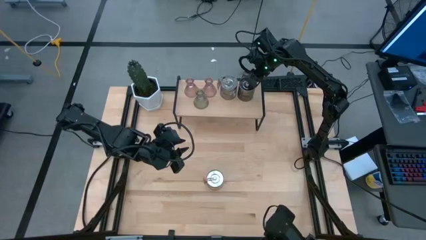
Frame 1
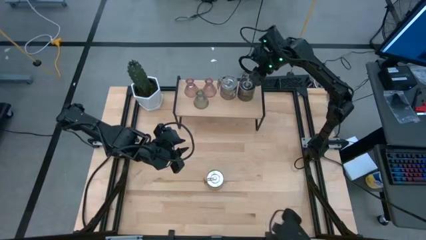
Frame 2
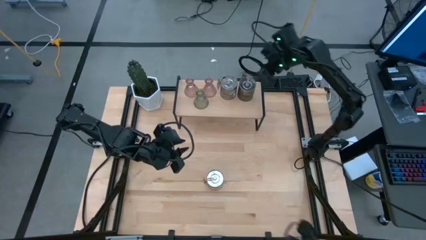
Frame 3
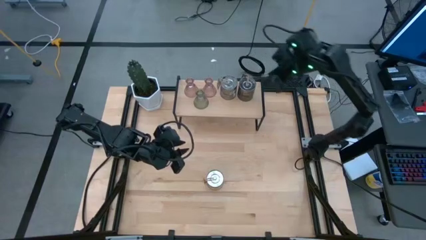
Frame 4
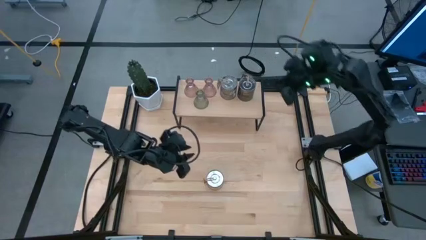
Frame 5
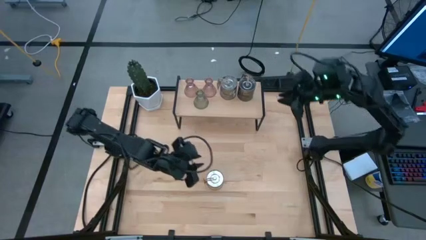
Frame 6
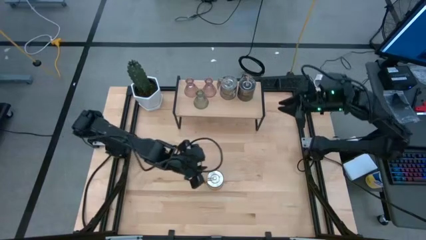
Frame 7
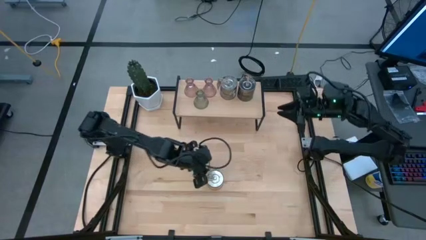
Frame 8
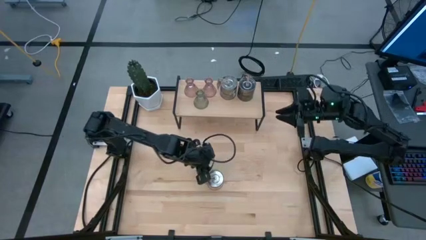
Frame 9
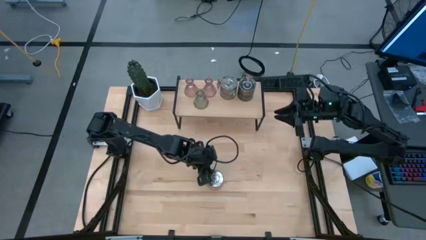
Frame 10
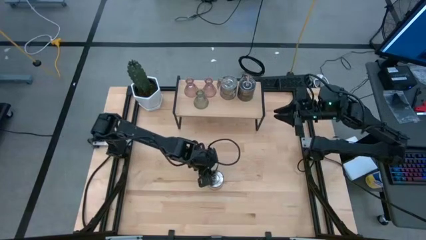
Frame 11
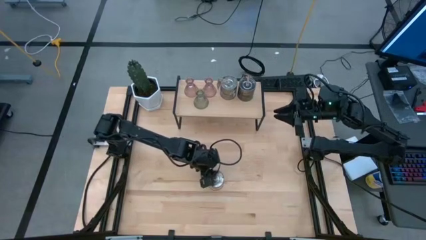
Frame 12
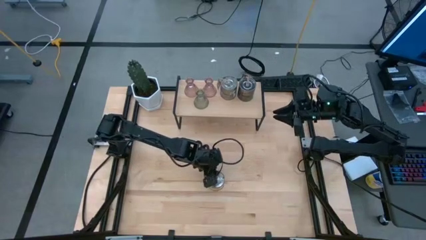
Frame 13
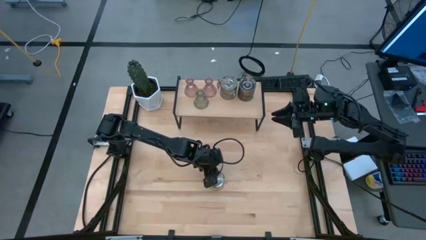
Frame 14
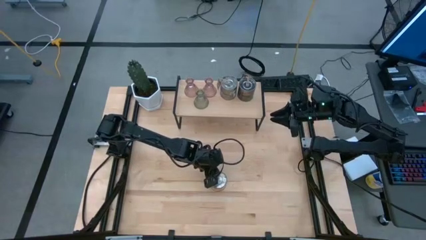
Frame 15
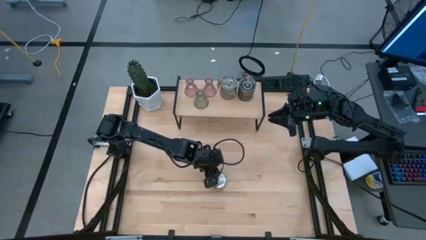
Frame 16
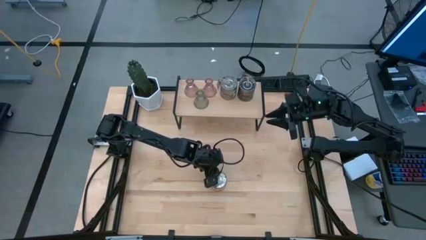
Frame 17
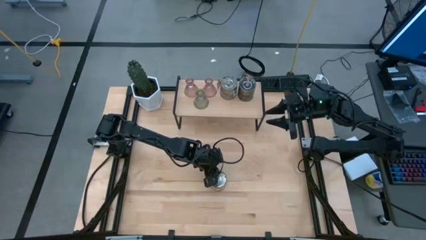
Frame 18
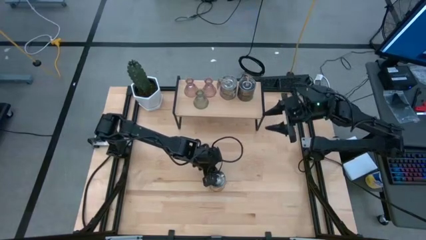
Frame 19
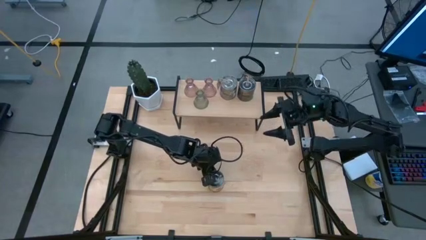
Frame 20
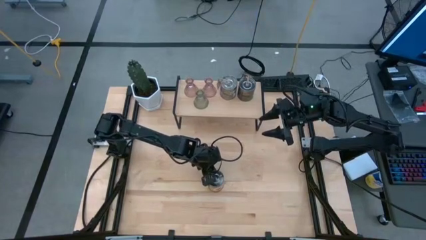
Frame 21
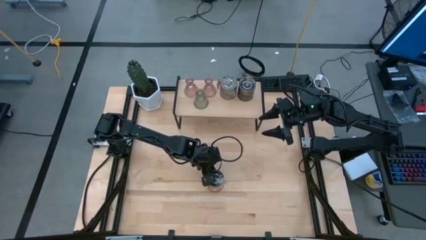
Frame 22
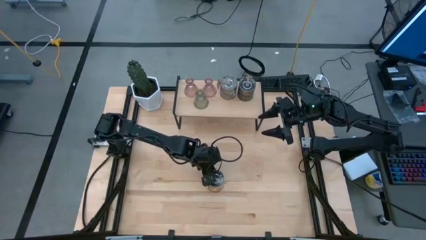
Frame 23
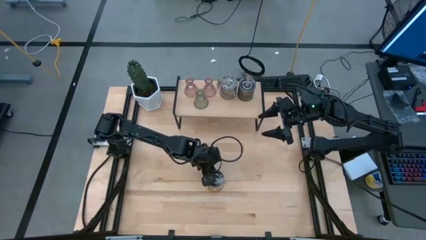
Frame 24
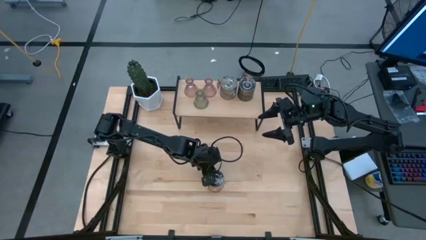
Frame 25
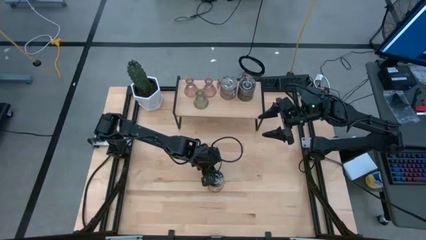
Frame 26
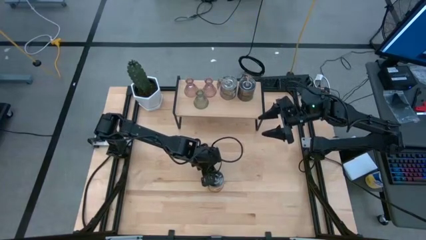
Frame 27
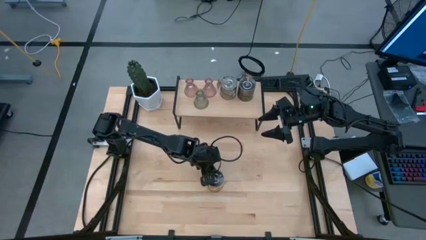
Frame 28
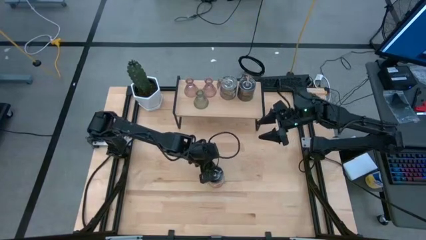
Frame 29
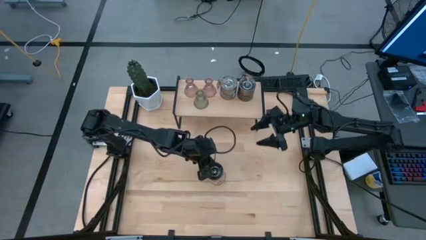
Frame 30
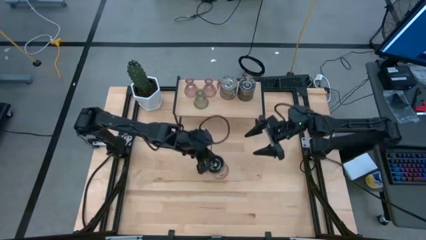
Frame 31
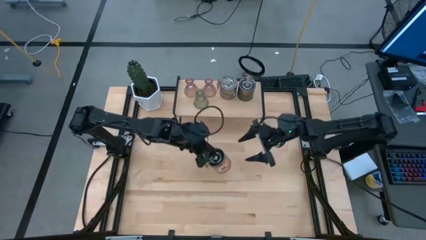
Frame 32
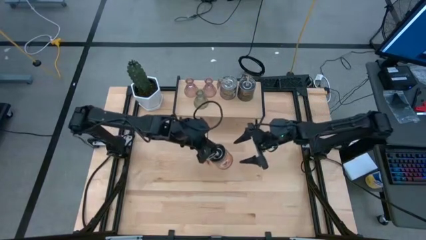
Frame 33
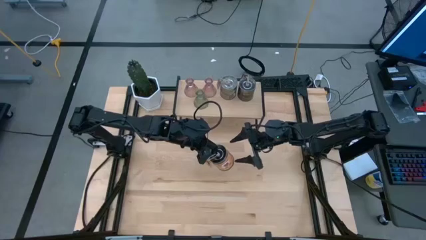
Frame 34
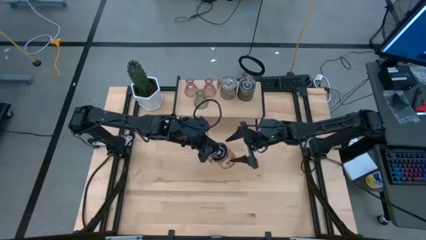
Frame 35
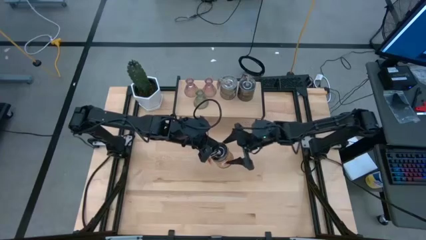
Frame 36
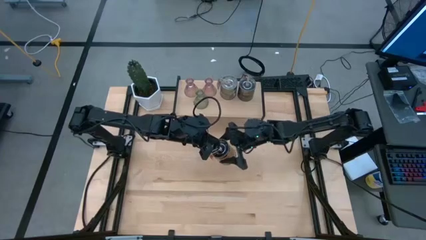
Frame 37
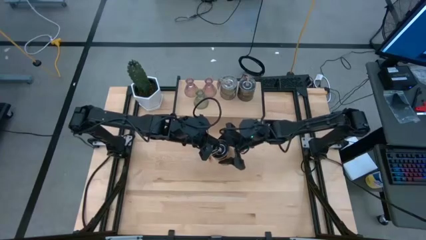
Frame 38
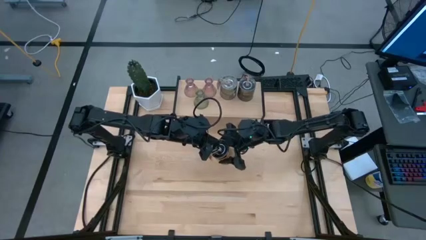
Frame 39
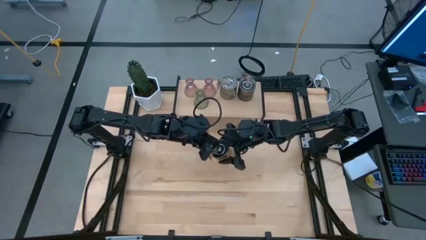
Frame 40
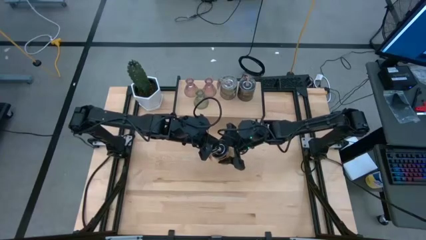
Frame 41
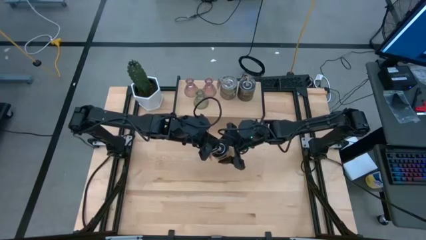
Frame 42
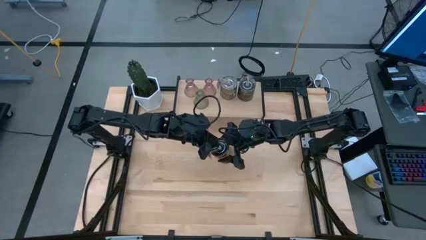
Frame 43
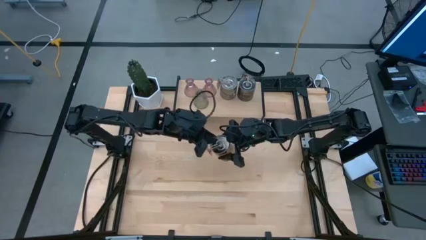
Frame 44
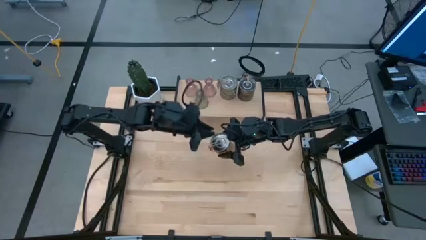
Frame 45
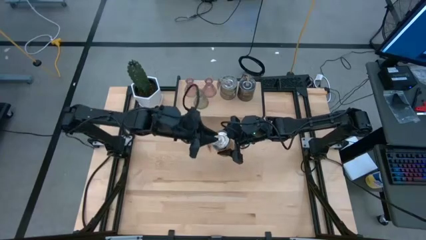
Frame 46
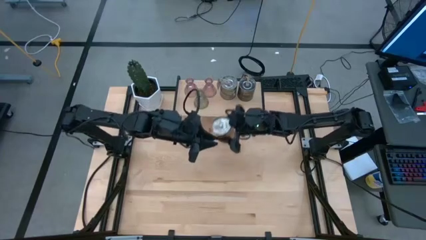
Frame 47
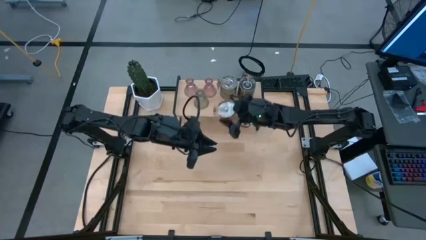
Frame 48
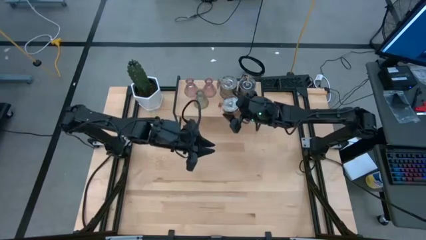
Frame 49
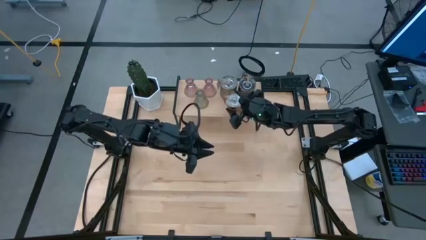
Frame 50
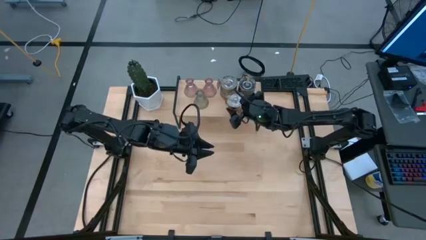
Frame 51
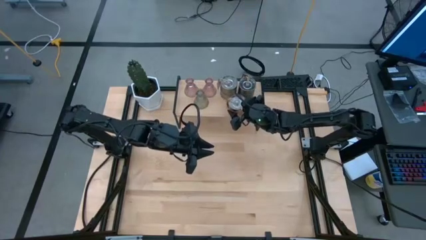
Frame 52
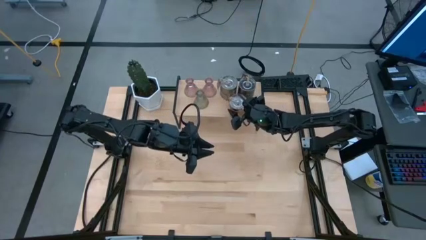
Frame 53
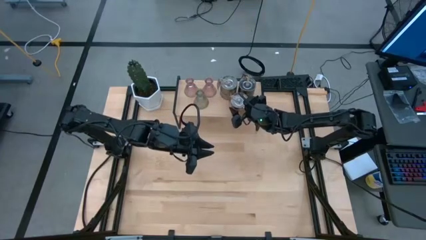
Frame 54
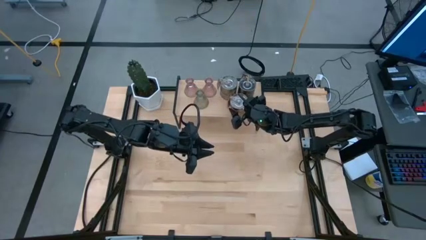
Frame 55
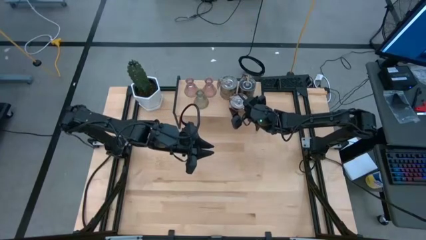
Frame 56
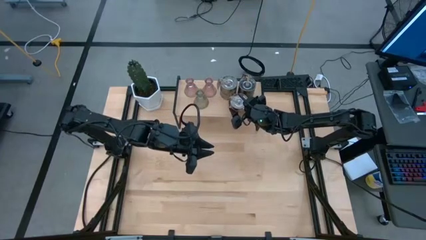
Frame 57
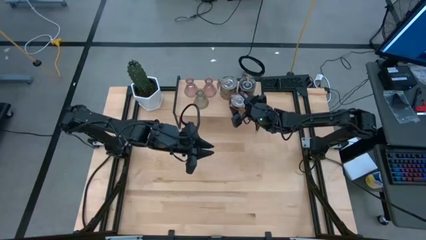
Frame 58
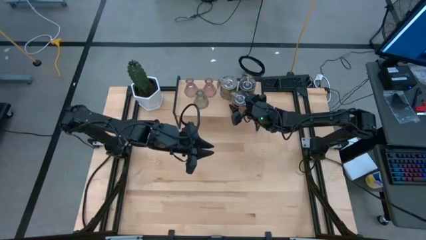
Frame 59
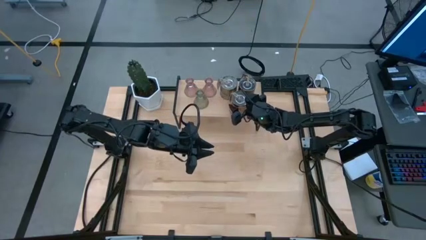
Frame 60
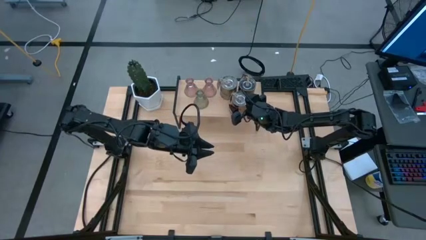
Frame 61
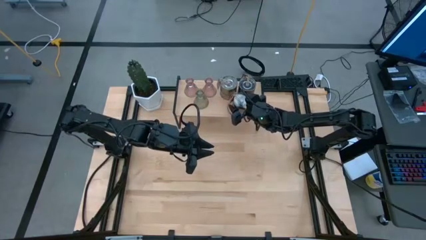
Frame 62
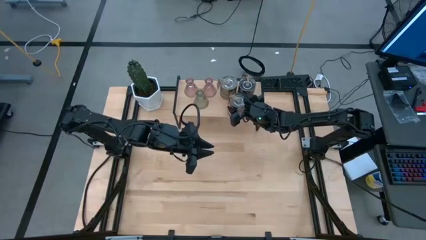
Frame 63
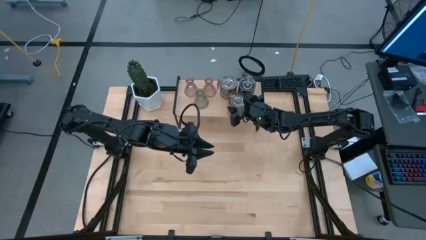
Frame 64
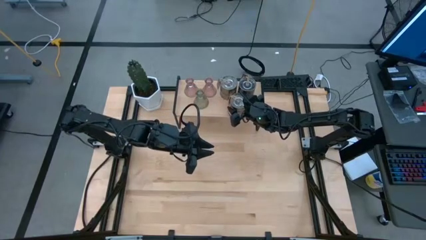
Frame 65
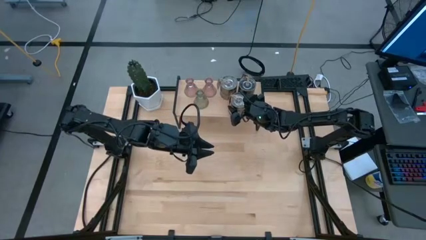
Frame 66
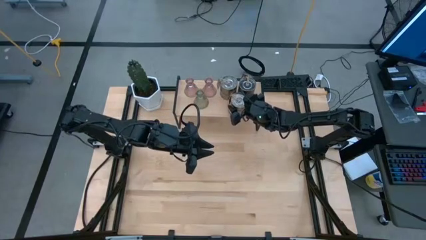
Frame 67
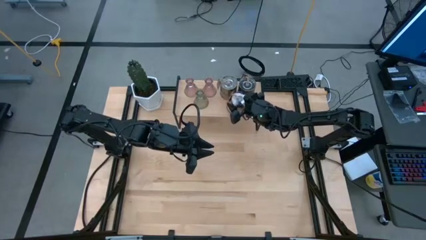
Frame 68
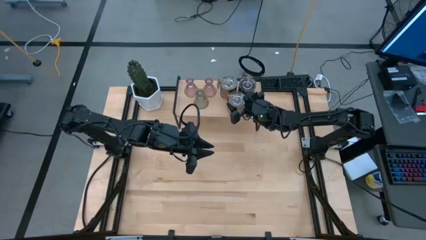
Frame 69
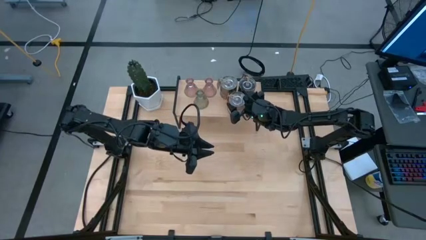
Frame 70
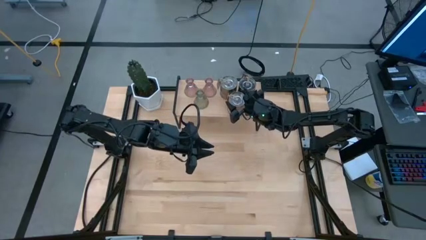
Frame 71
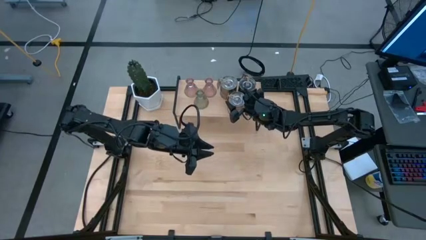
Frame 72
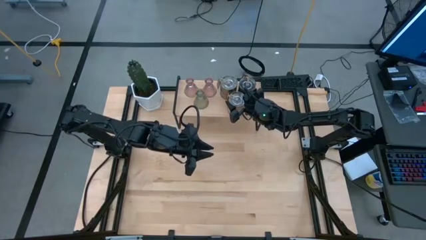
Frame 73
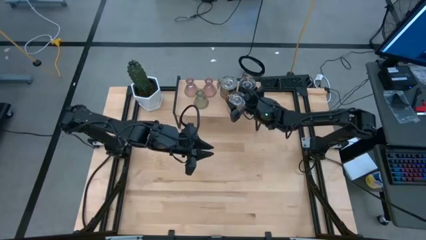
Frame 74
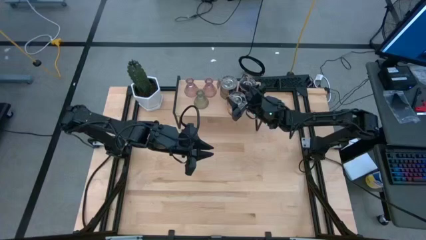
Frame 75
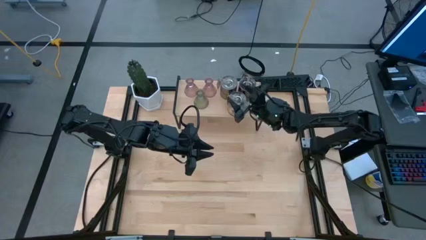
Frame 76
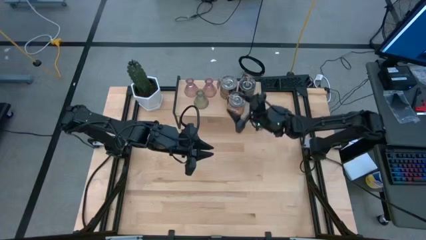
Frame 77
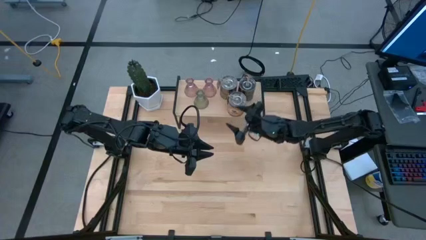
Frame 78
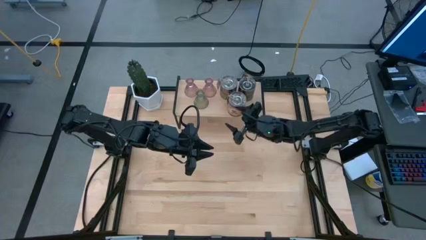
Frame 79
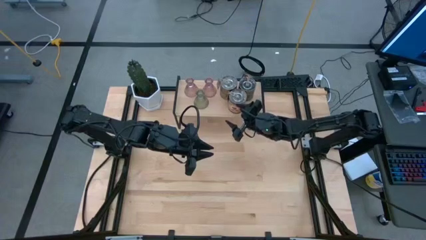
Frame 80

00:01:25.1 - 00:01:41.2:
Task: Pick & Place candle stick holders
Put the orange scented candle on the shelf
